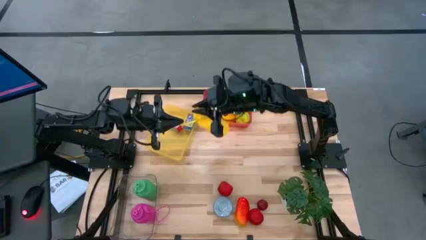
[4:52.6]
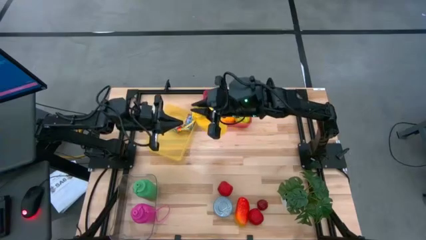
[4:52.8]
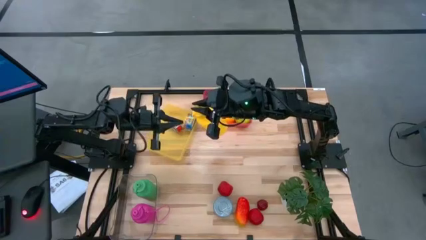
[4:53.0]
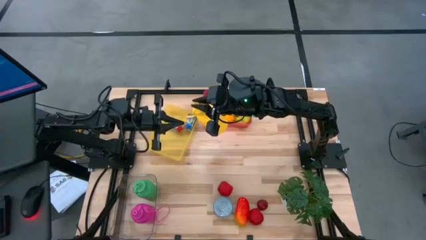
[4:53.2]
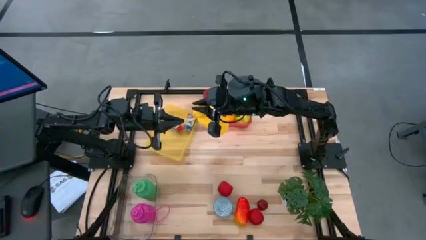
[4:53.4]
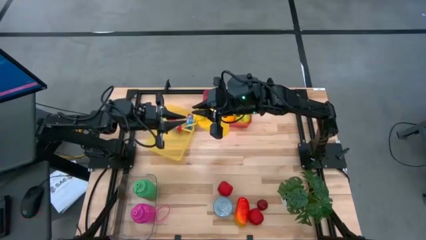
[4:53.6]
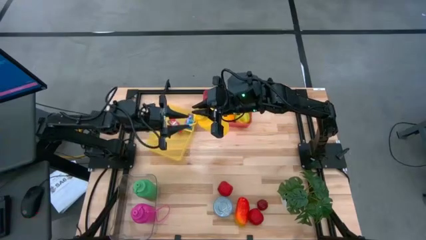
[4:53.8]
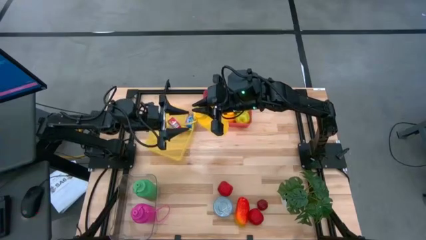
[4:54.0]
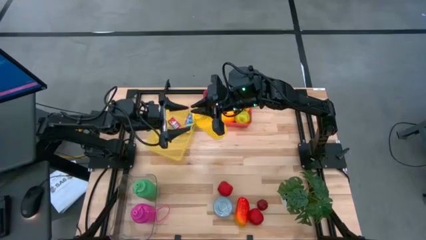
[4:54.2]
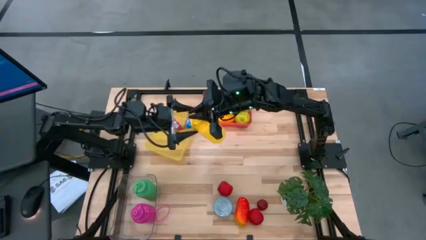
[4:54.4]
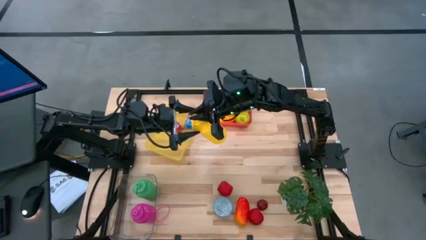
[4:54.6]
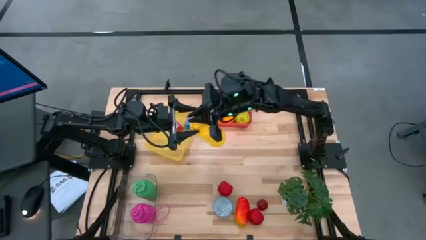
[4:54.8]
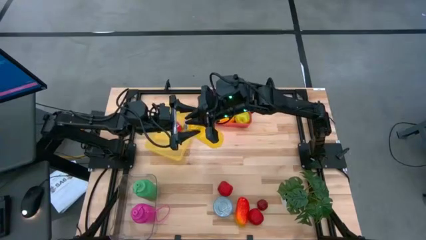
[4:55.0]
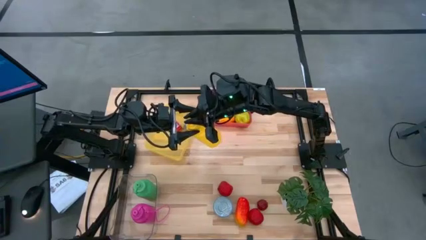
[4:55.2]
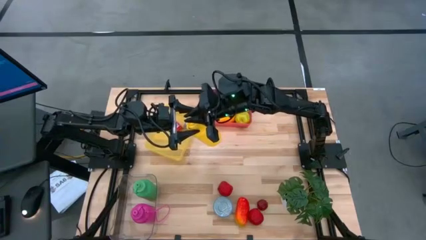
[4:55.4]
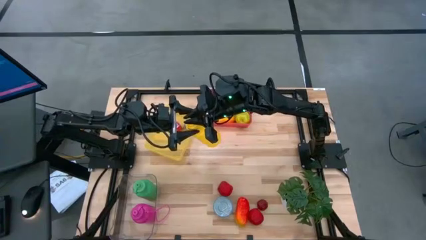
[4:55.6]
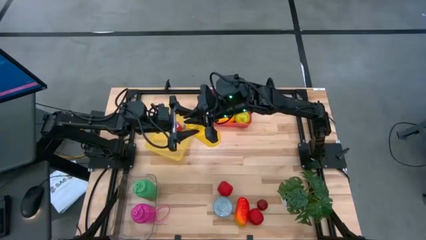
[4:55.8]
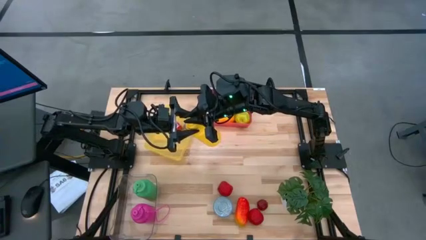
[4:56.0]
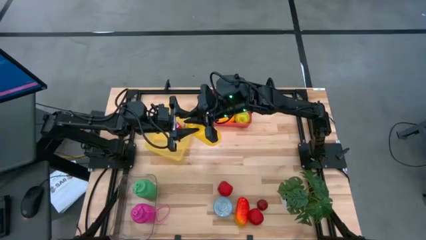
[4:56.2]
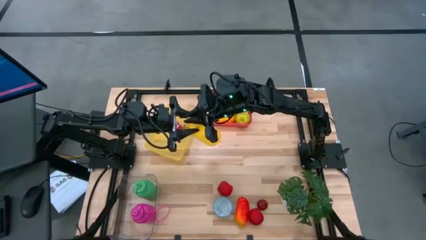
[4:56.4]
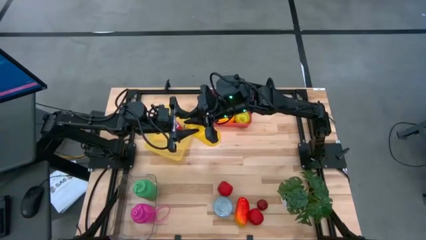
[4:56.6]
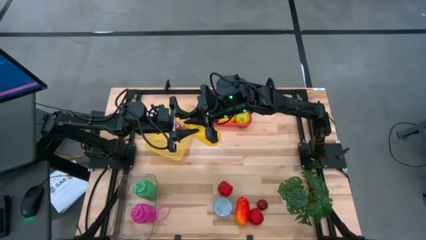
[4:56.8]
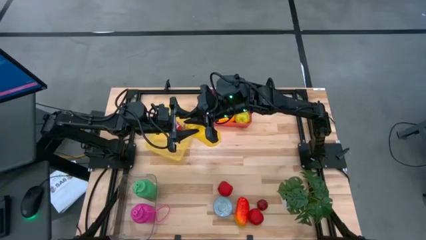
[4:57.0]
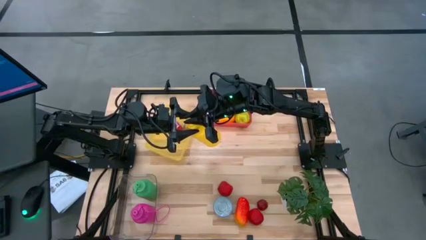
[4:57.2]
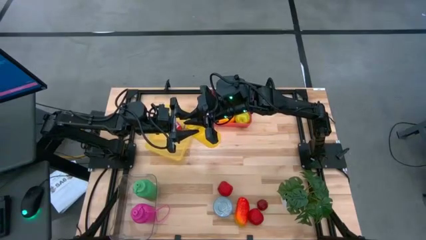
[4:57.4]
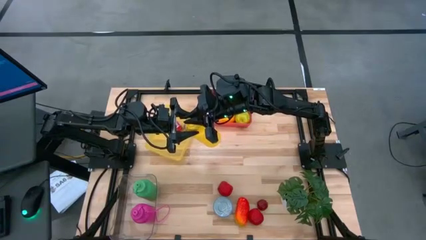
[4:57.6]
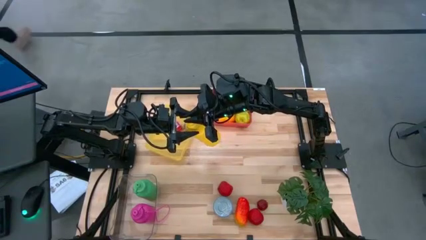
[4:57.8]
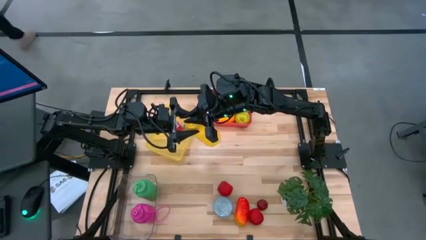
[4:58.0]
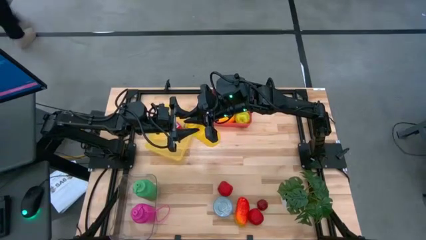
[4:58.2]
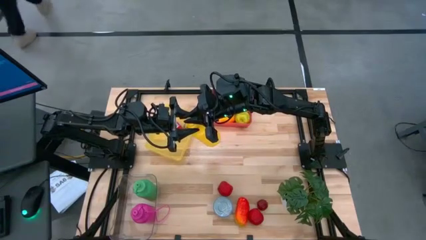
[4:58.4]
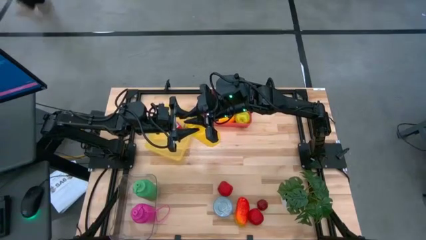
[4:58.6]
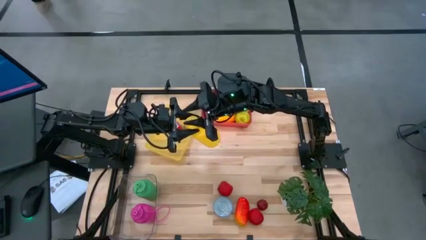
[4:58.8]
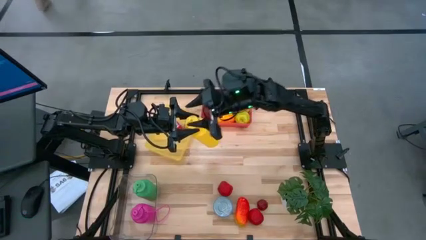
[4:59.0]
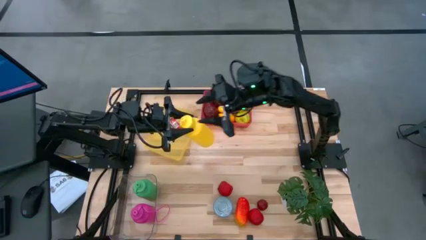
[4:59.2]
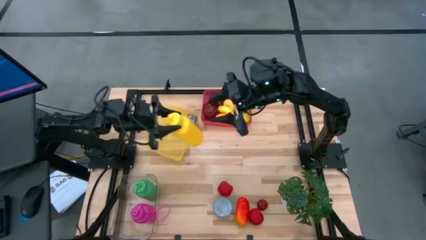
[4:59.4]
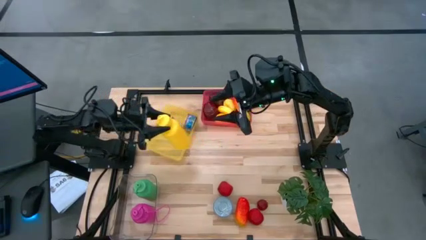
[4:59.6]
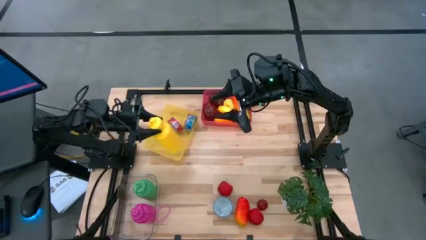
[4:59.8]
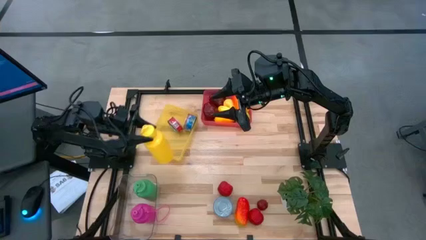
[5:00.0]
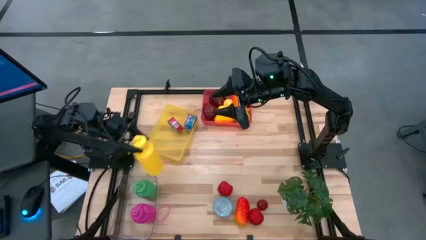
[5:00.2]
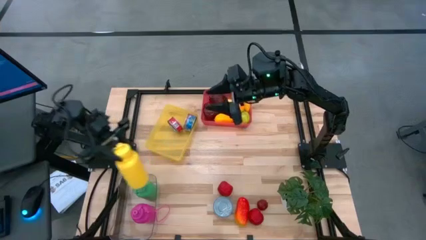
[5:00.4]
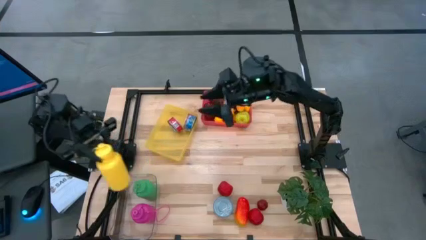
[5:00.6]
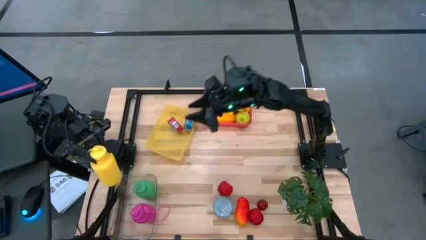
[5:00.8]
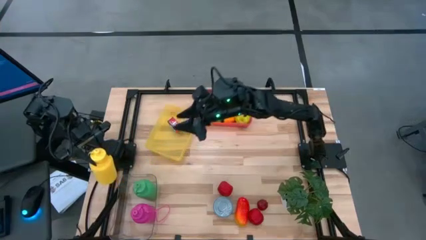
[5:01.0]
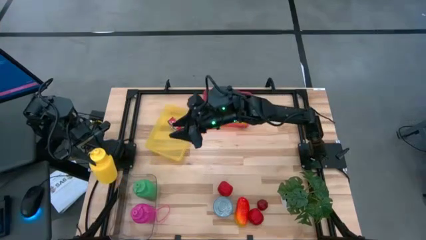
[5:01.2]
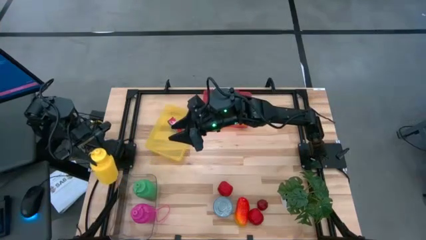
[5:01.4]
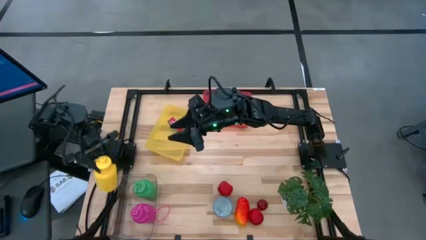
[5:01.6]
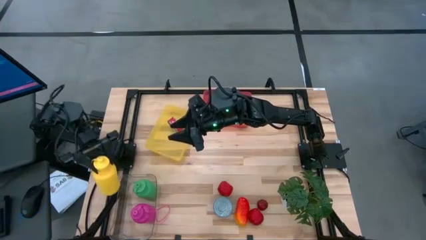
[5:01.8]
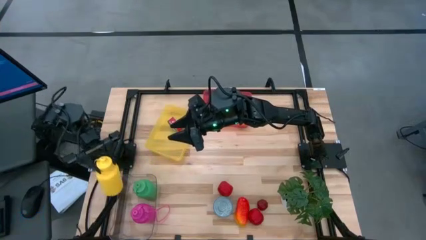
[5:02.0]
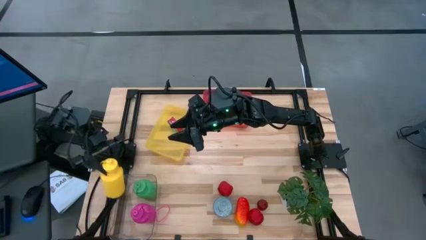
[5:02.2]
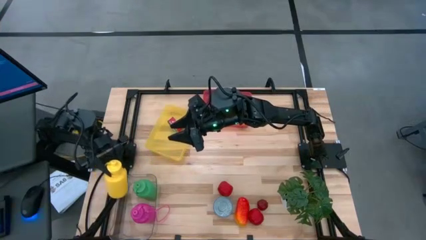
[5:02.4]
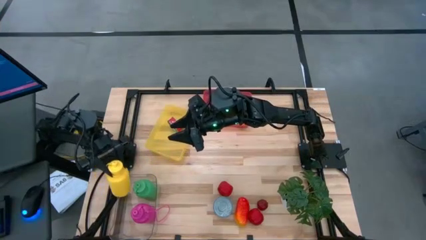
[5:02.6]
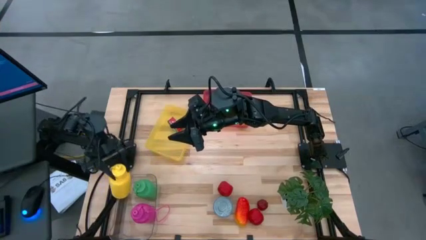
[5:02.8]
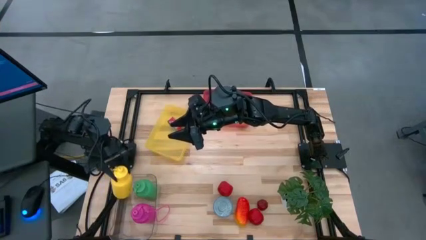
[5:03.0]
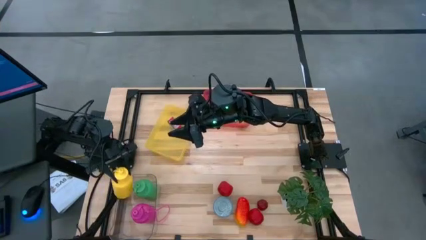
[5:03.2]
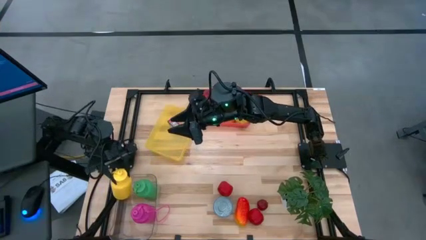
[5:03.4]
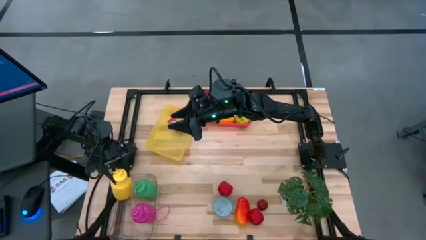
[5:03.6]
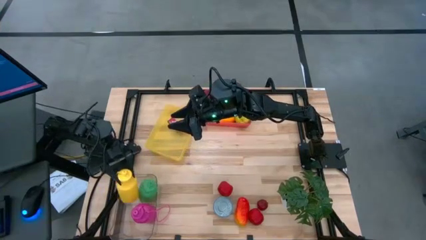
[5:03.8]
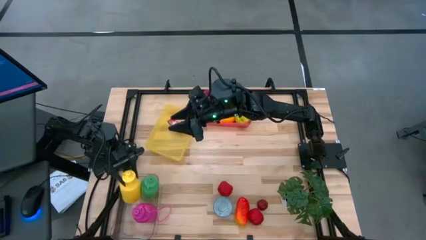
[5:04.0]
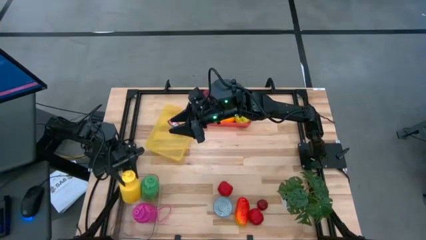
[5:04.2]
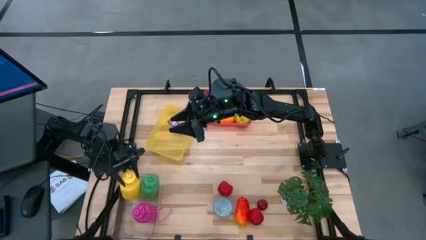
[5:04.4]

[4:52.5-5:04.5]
Task: Pick & Place Food Item
Put the yellow water bottle into the transparent bin
